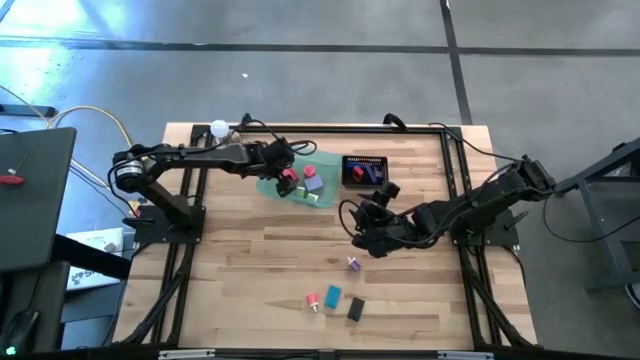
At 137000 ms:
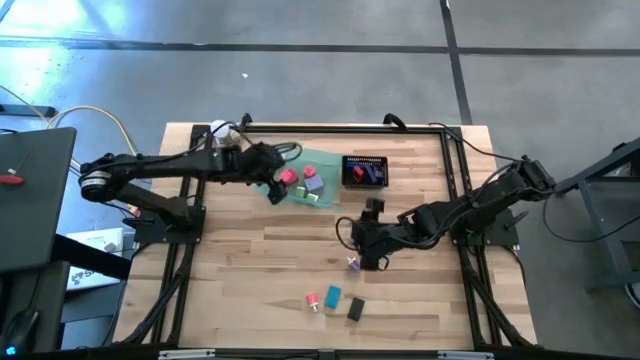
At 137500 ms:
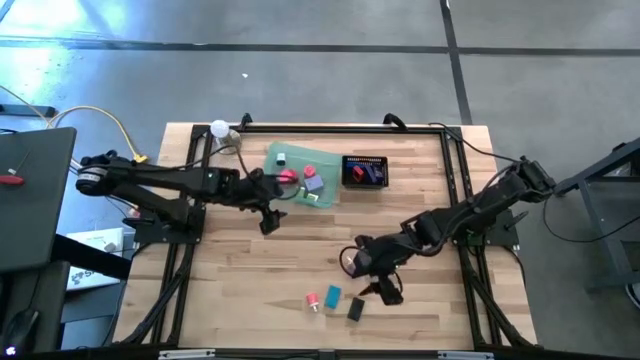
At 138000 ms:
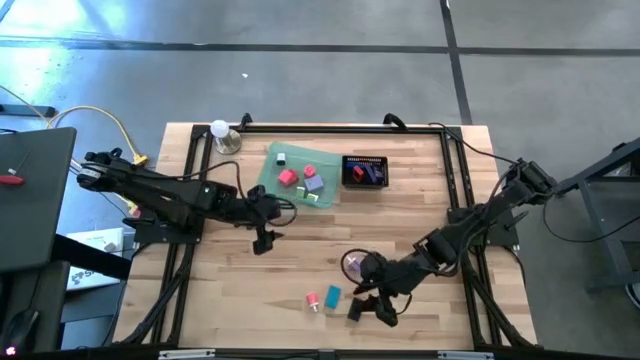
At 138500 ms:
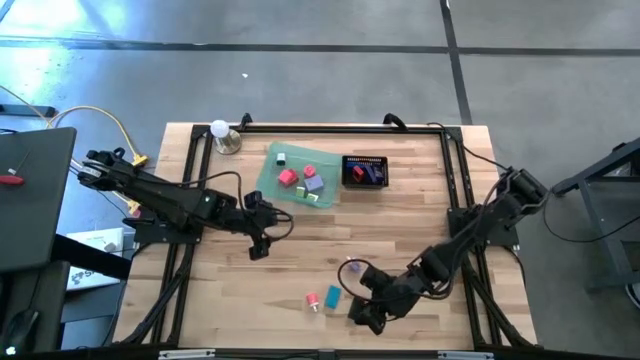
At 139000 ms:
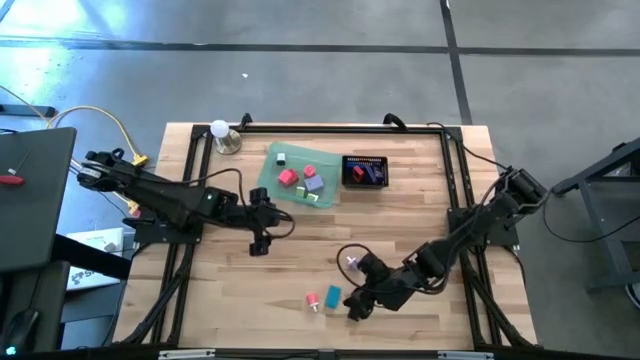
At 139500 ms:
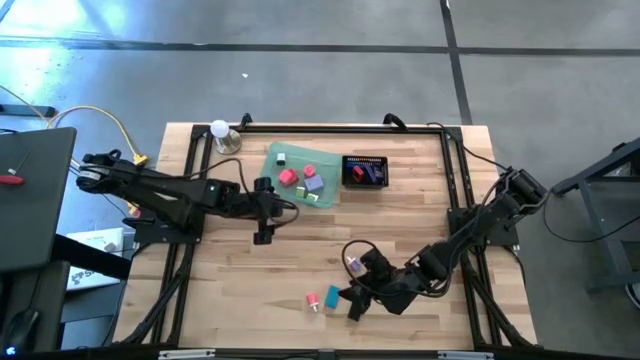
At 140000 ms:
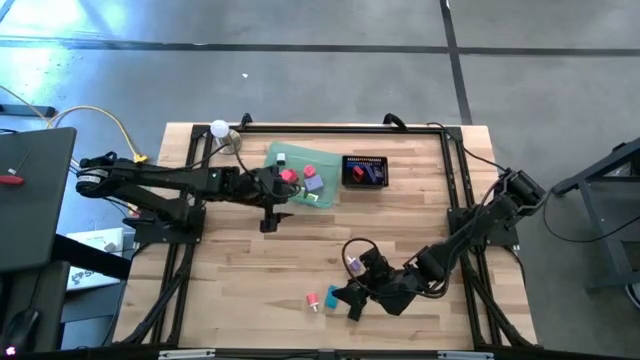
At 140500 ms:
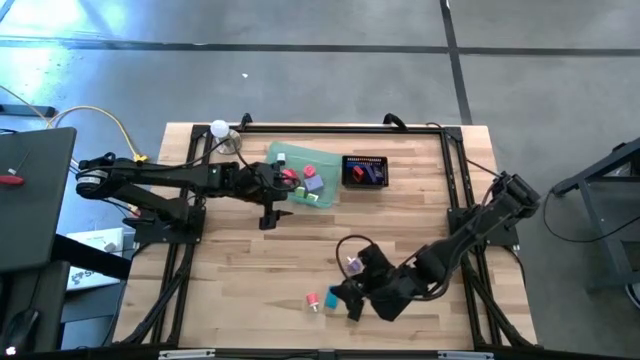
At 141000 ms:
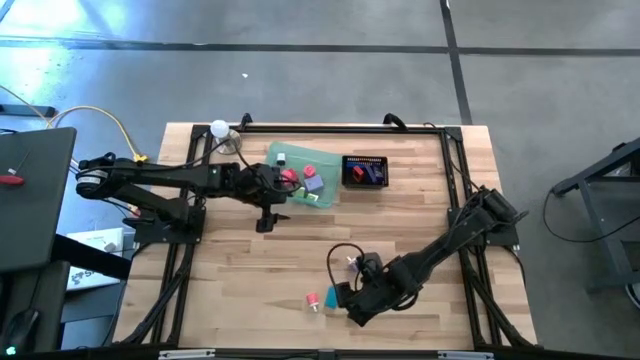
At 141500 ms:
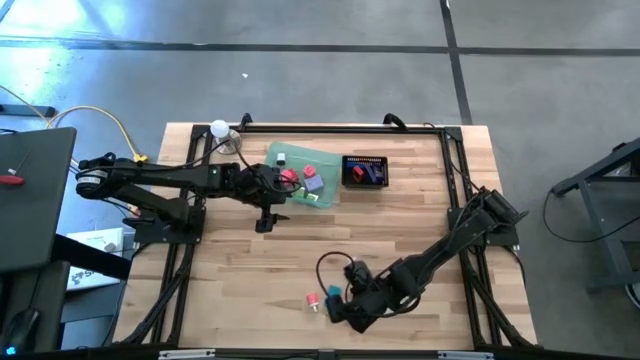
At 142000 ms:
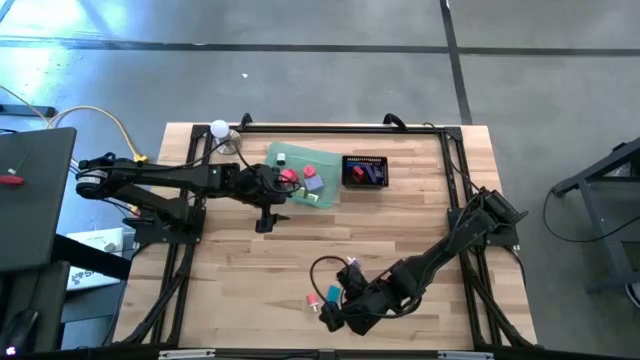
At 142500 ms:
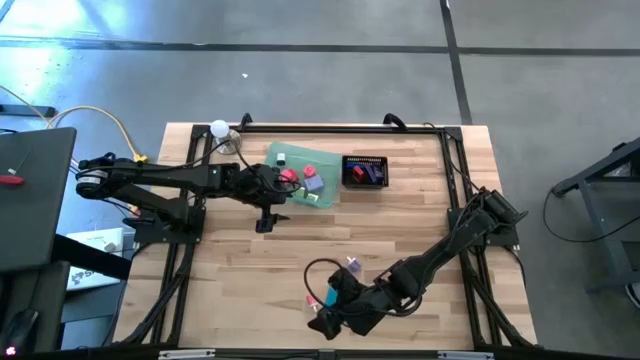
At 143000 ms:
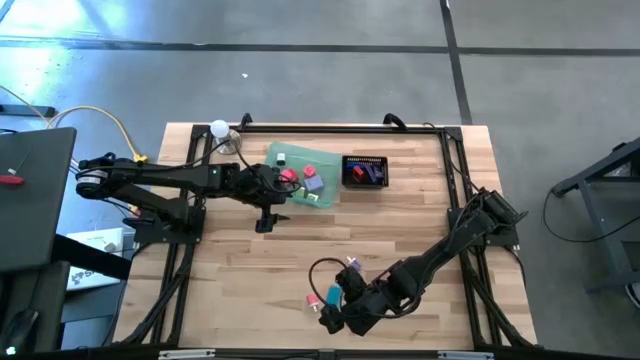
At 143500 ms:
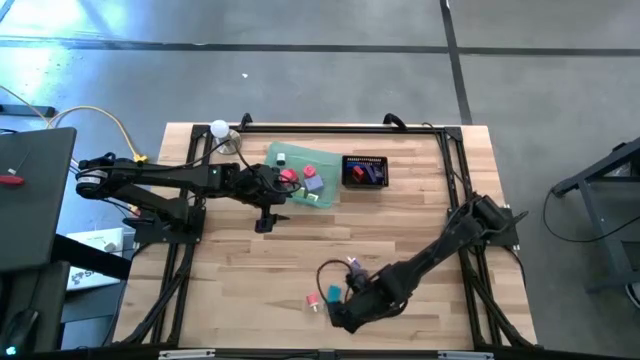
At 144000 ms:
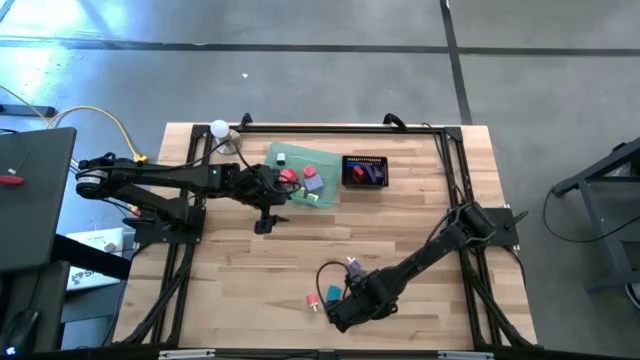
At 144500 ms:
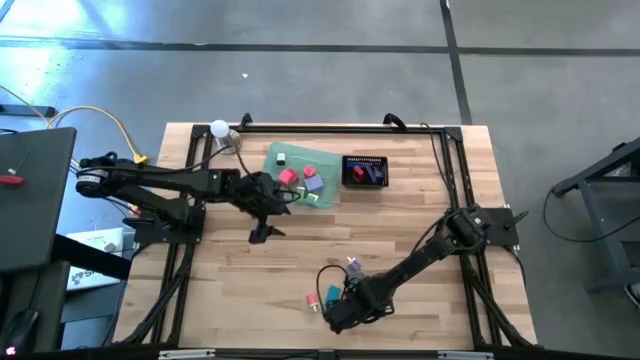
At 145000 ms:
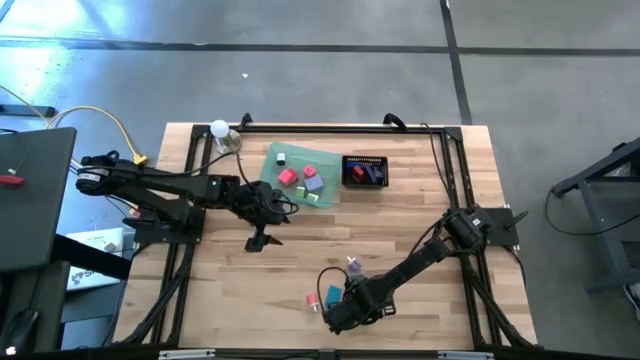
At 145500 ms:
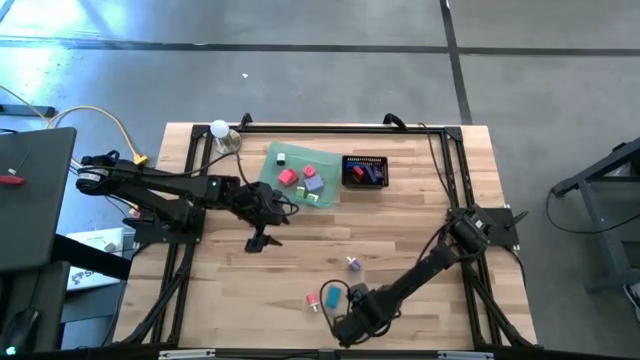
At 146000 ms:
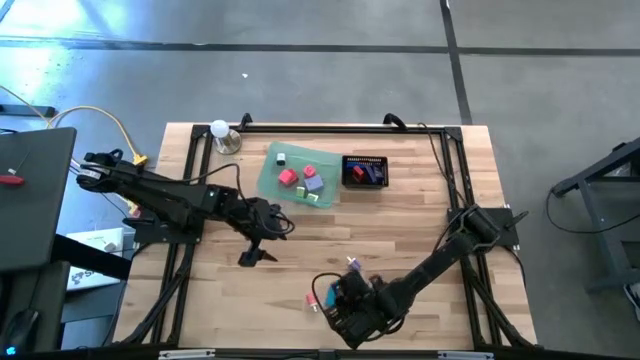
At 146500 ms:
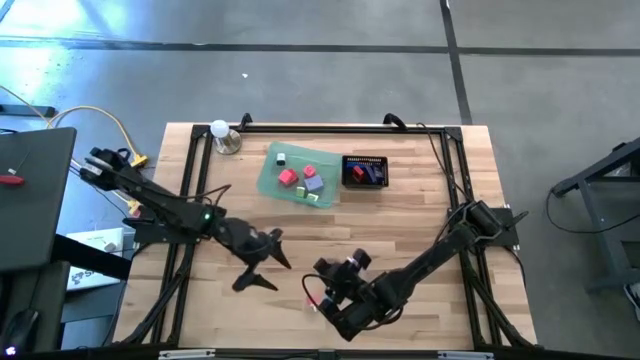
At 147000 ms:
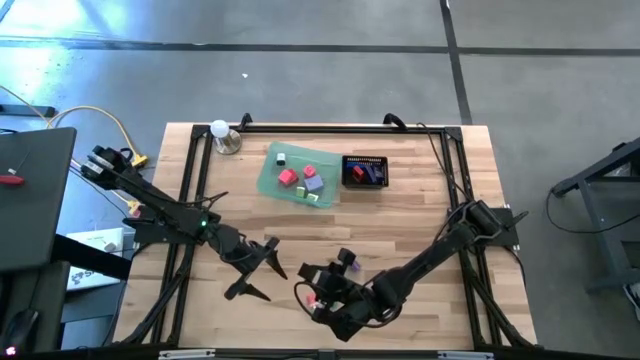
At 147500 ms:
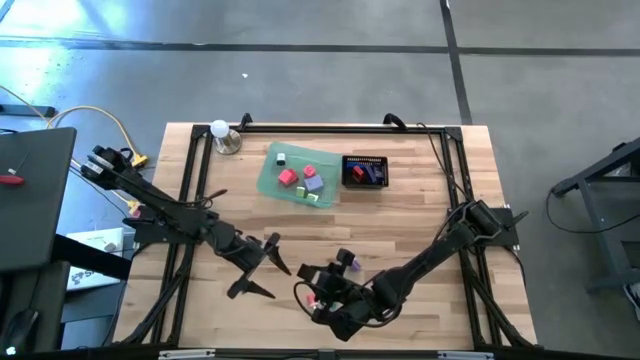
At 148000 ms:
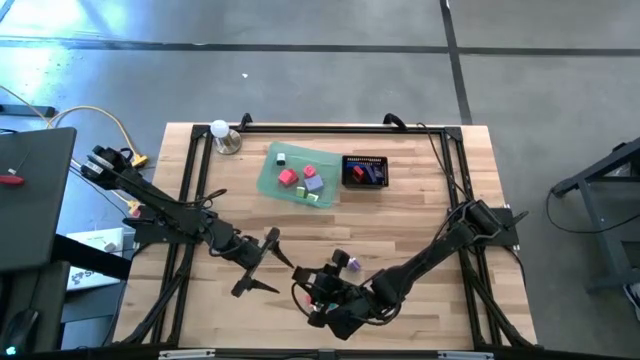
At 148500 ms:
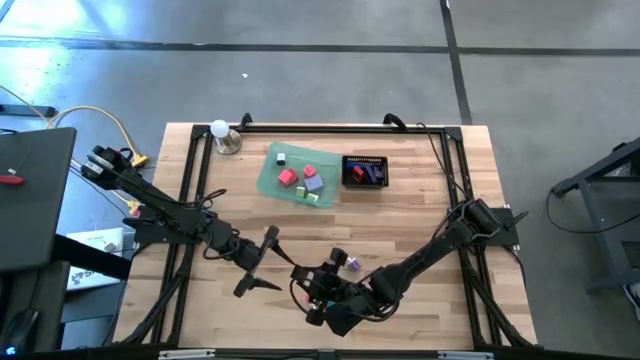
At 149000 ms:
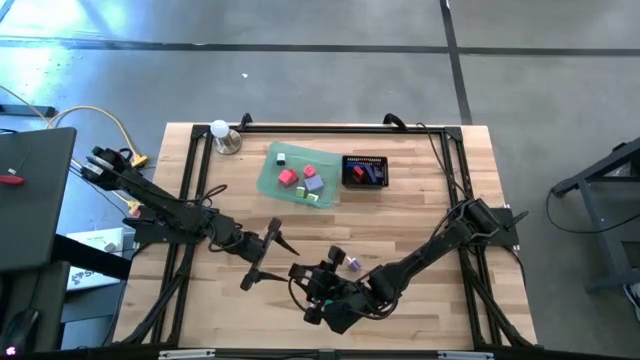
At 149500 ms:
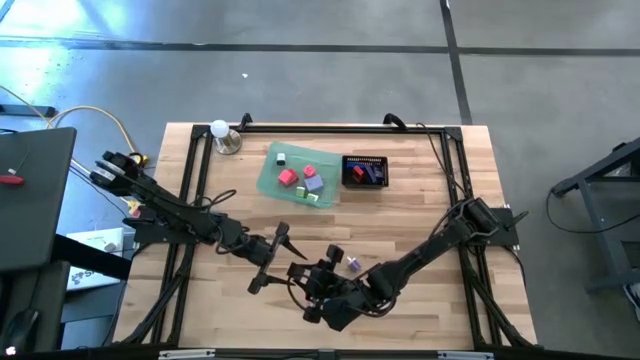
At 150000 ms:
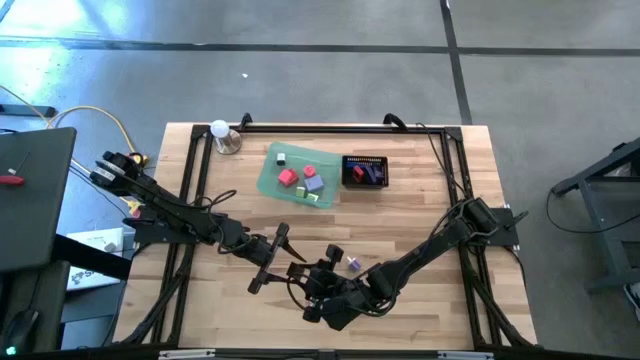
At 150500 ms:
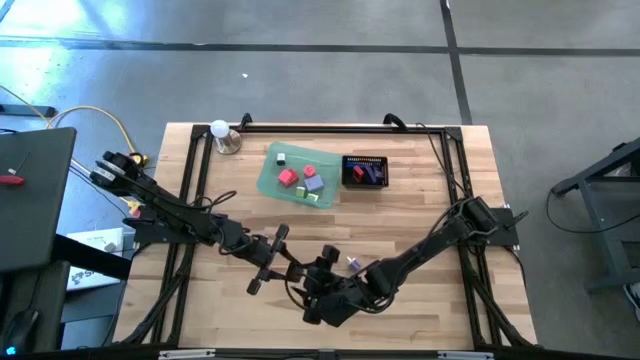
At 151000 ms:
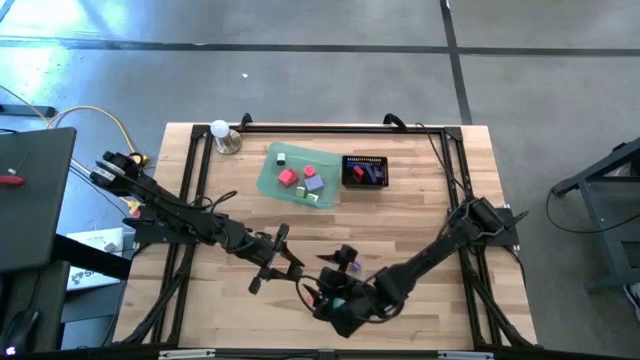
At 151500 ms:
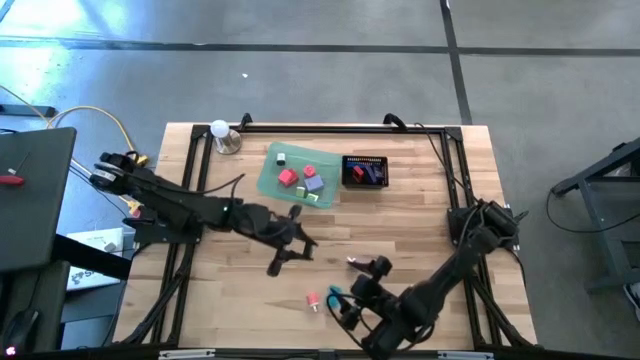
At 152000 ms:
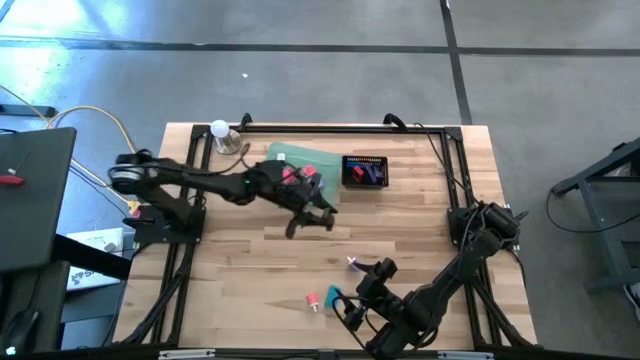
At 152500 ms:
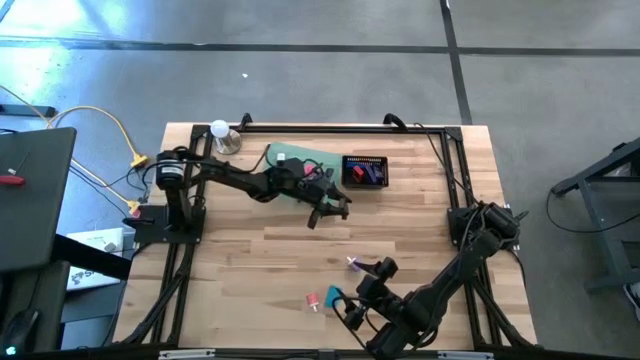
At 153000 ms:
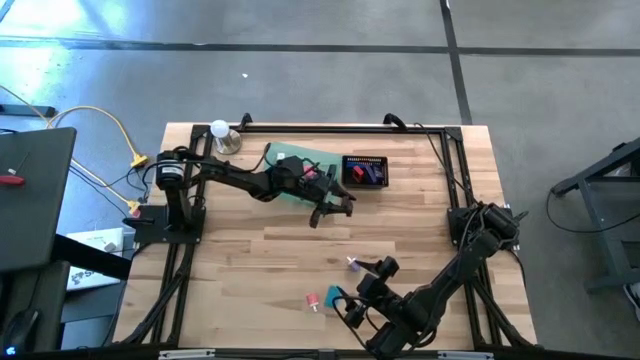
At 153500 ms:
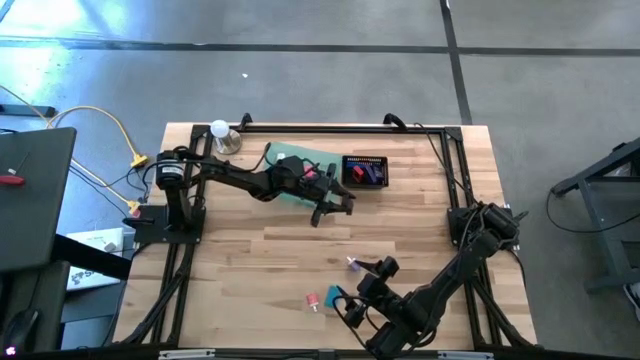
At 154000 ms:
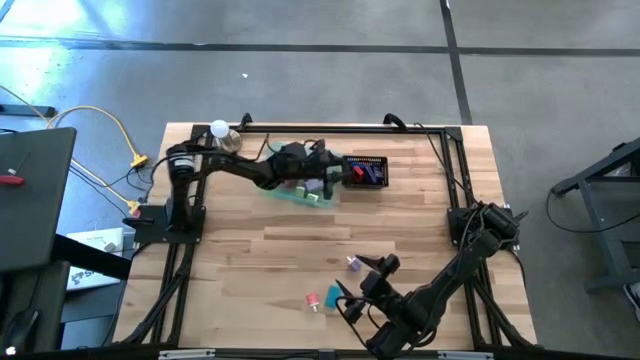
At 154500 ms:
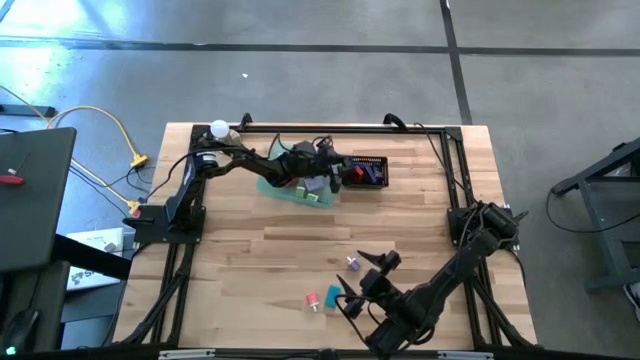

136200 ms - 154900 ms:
Task: Pick & Place Office items
Put the black digital timer into the black bin

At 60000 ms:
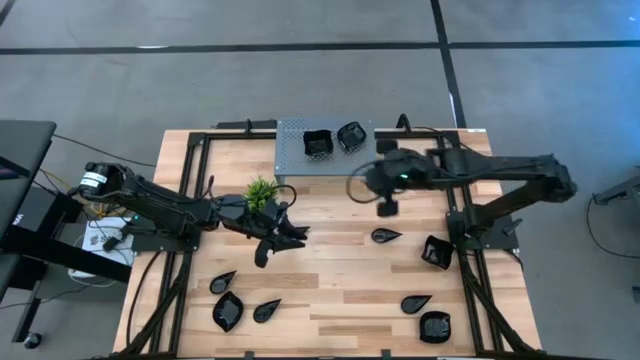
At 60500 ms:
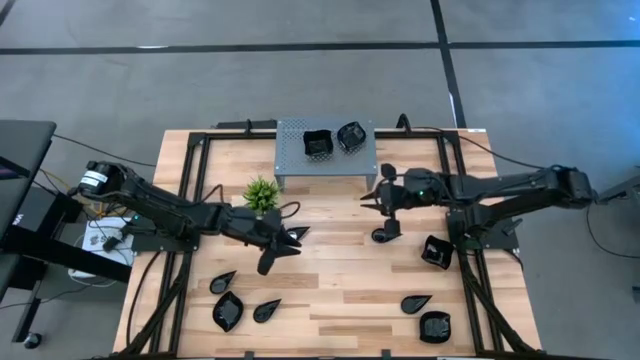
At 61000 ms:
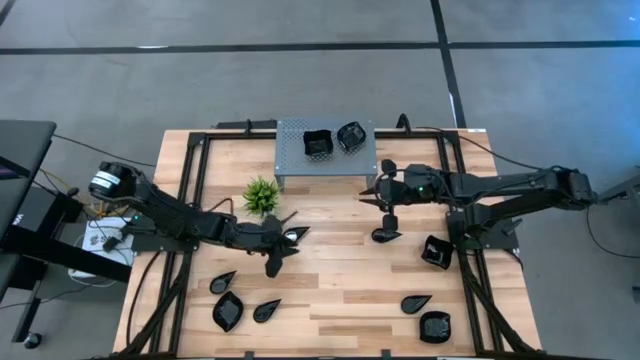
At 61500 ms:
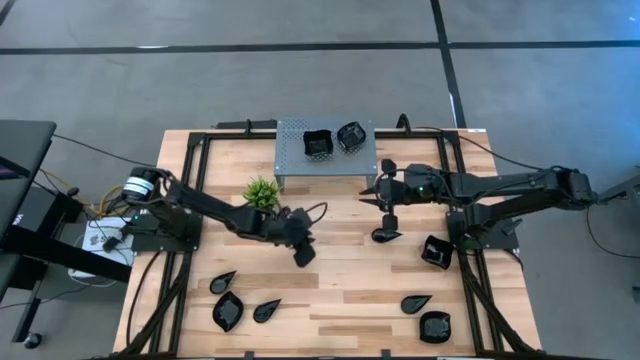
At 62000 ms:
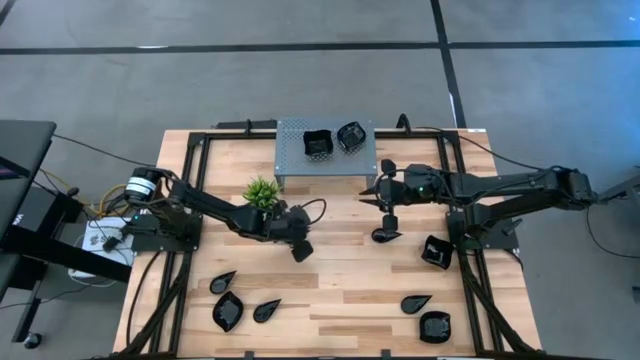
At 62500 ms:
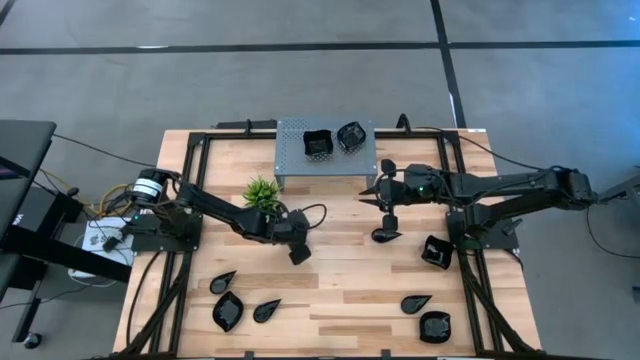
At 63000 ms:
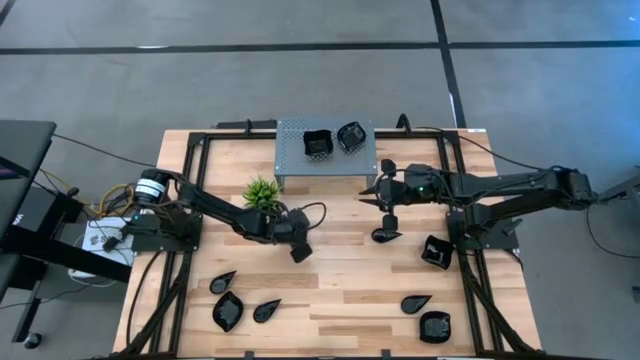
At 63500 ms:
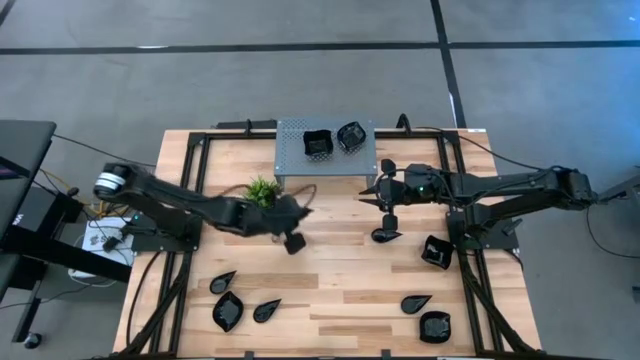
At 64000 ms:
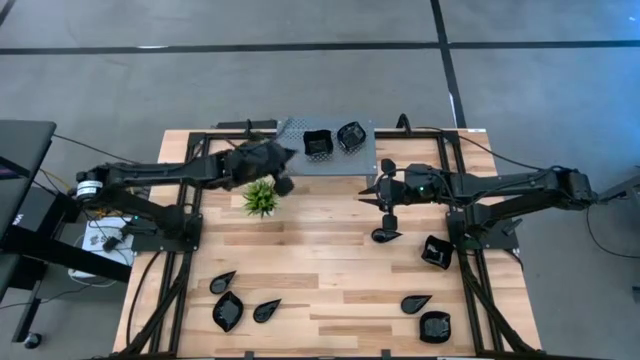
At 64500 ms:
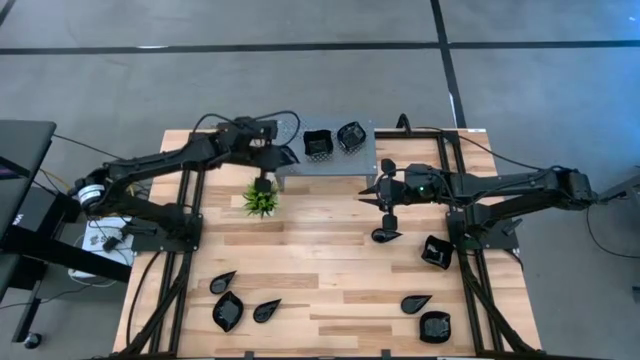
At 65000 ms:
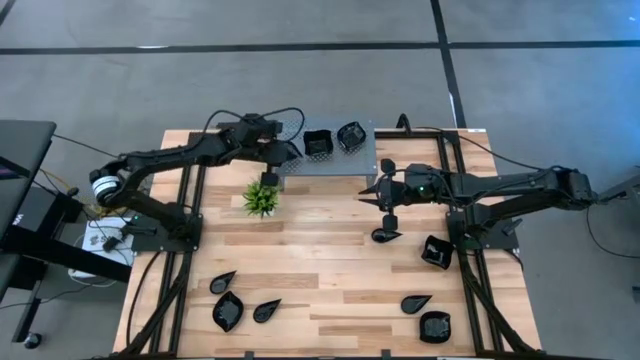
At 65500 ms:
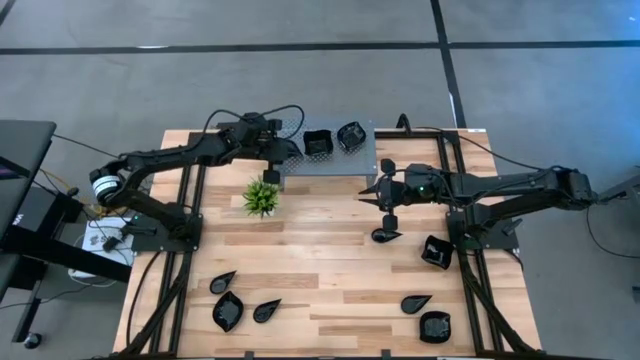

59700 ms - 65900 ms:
Task: Pick & Place Mini shaped plates
Put the black drop-shaped plate on the shelf
